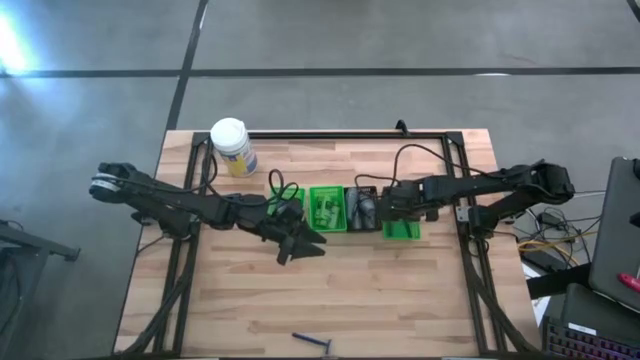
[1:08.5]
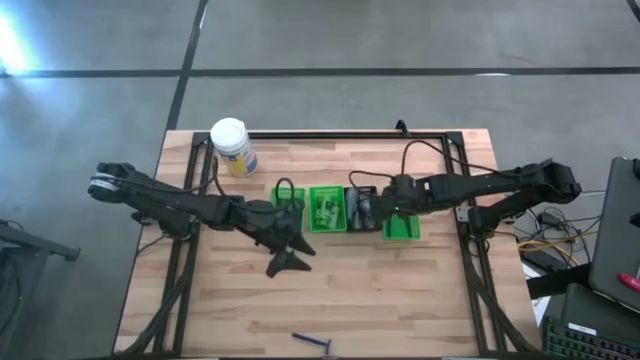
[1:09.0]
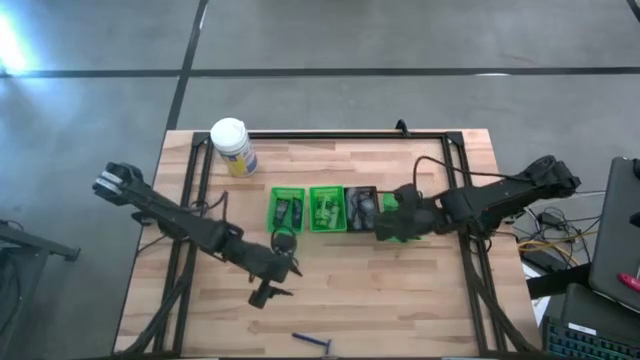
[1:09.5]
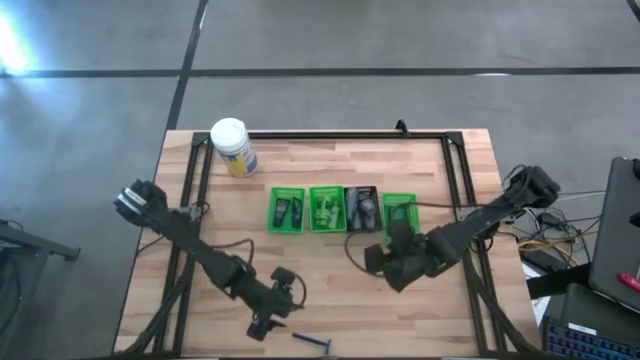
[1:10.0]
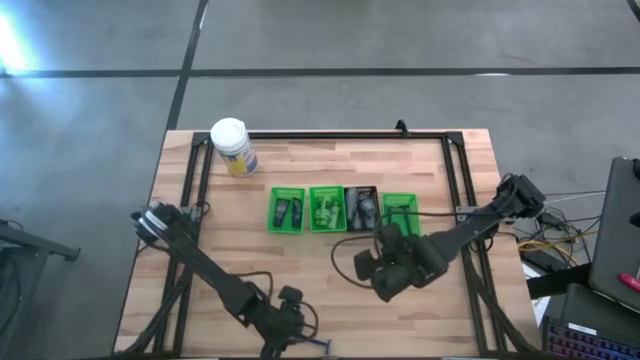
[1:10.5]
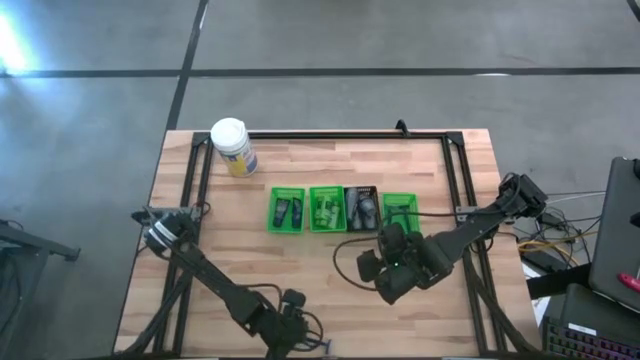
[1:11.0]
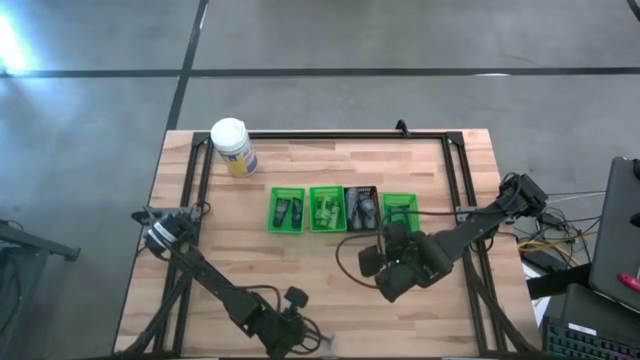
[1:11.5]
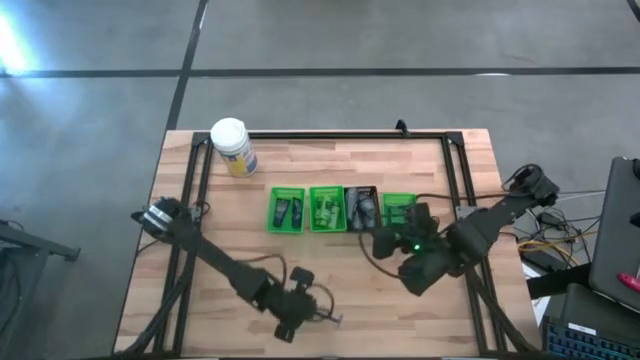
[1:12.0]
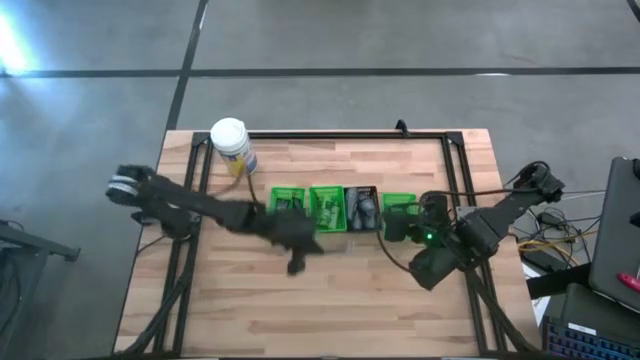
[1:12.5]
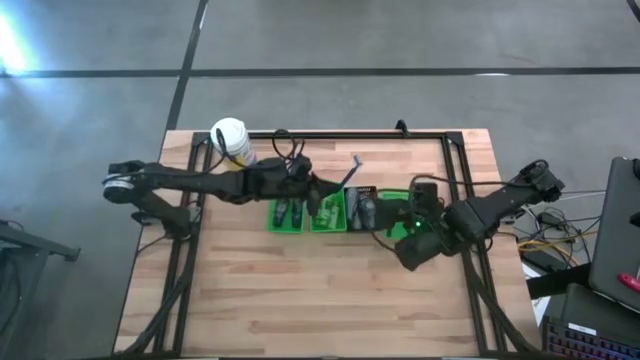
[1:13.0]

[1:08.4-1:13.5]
Task: Pick & Place Travel size toiletries
Put the blue razor into the right green bin

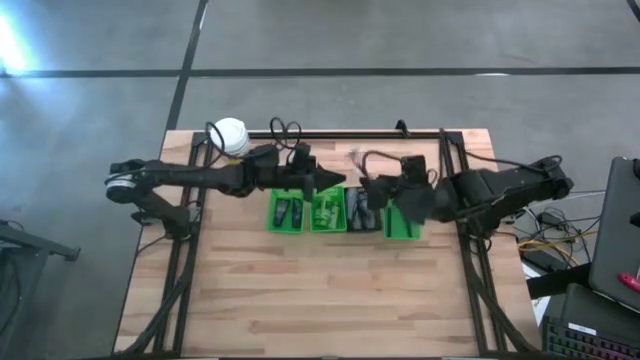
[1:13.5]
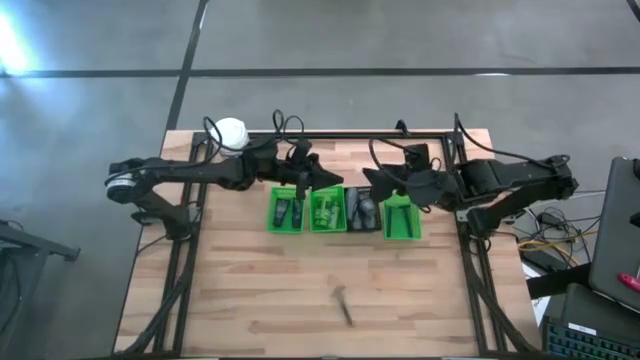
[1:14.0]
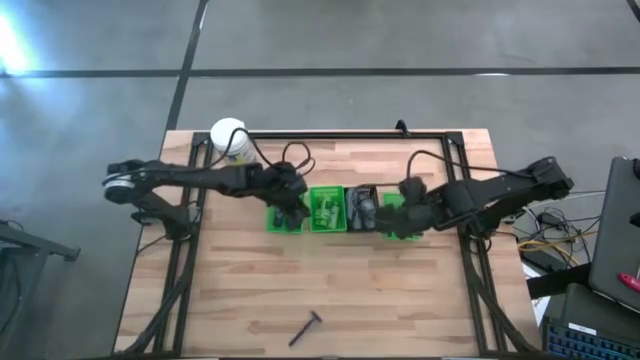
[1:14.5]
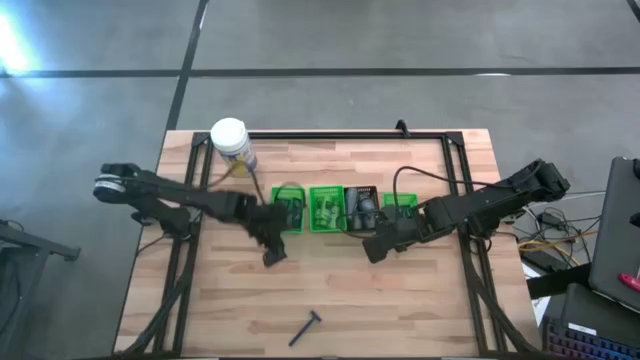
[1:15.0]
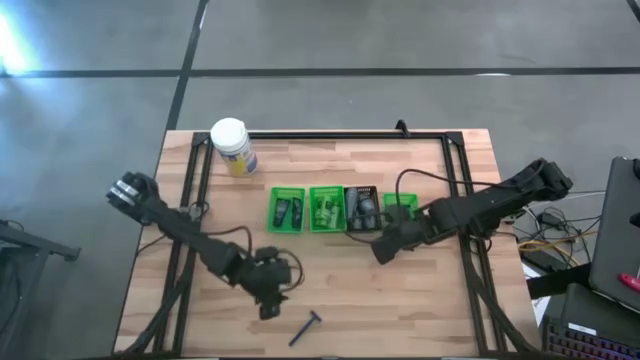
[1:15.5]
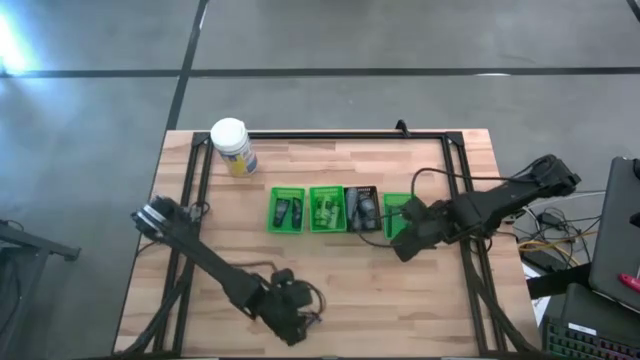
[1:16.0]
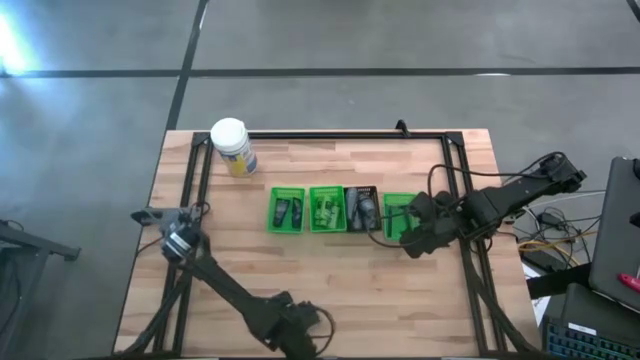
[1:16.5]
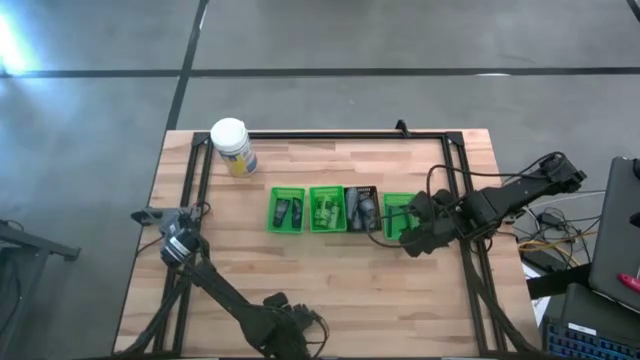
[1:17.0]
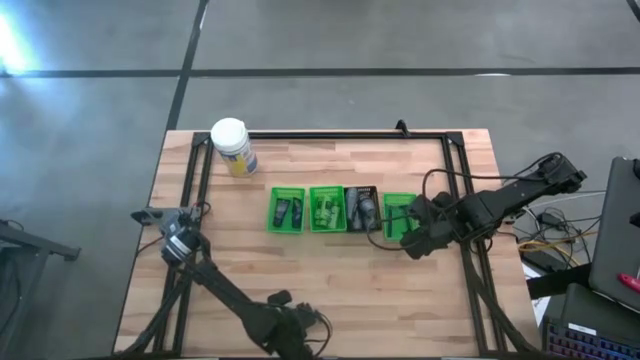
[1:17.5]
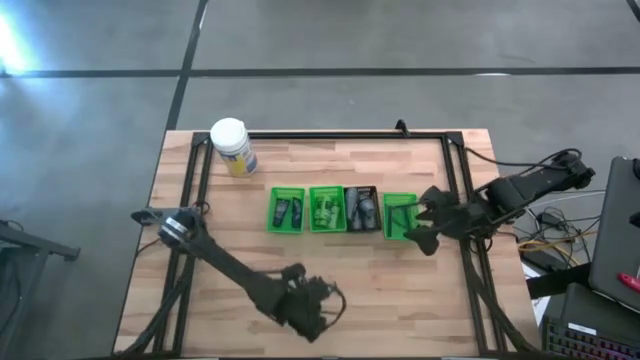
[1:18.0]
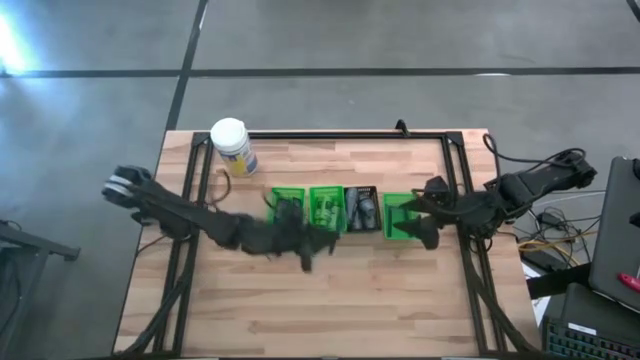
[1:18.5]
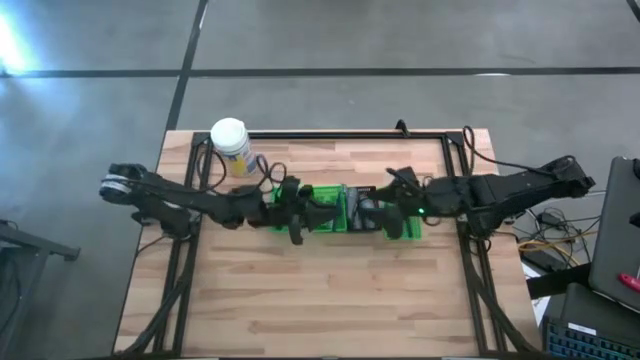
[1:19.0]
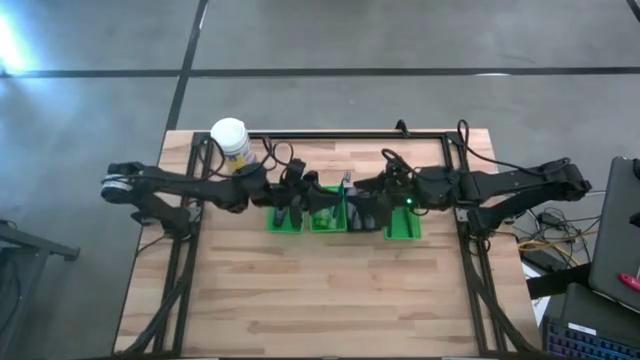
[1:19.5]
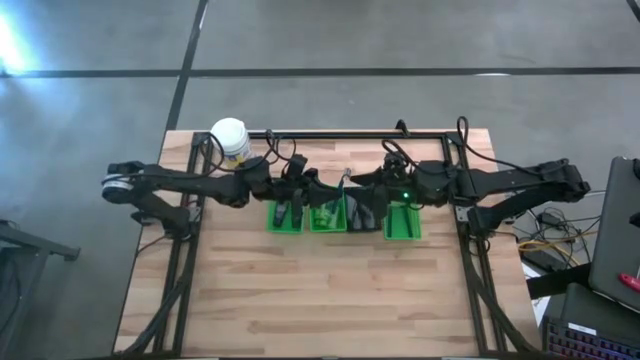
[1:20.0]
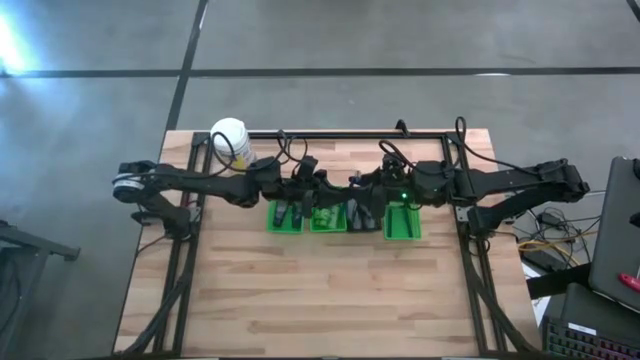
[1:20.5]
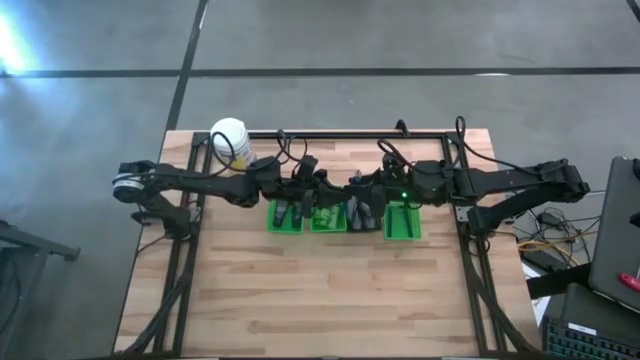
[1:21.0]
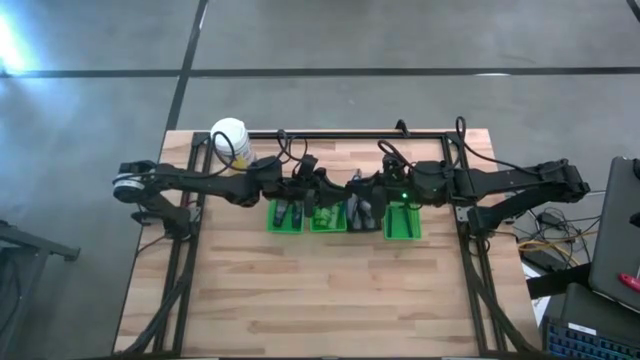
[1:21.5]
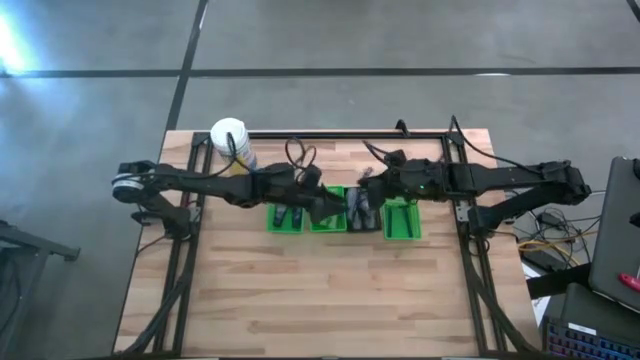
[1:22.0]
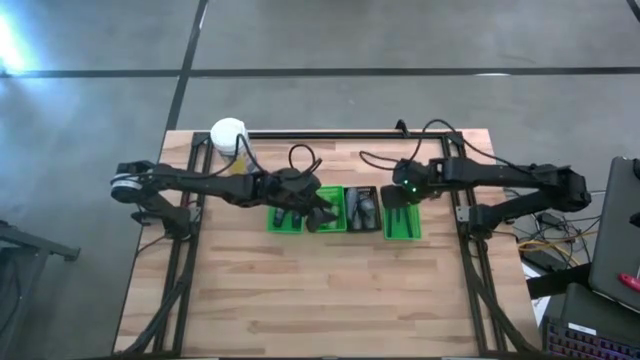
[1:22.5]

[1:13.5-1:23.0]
Put the blue razor into the right green bin

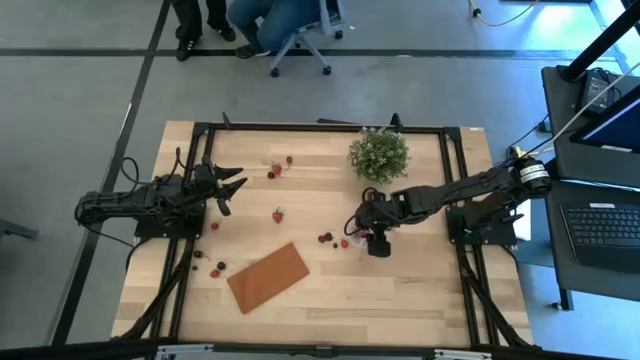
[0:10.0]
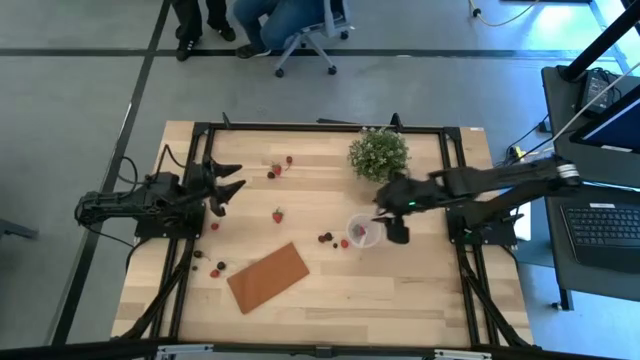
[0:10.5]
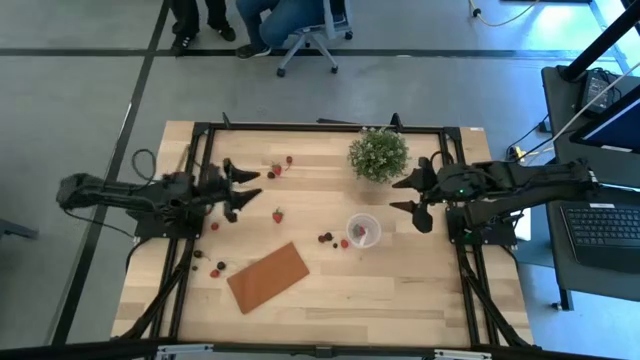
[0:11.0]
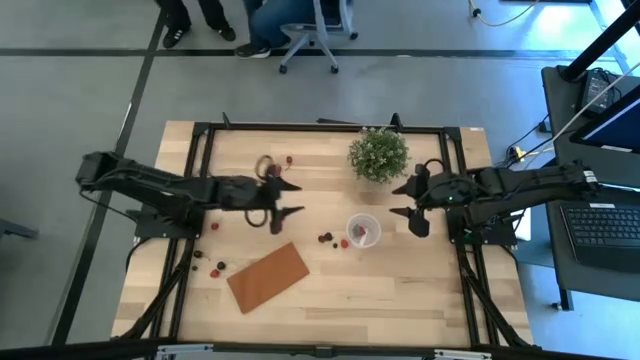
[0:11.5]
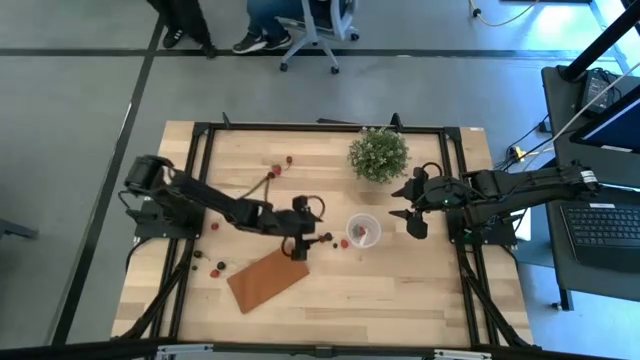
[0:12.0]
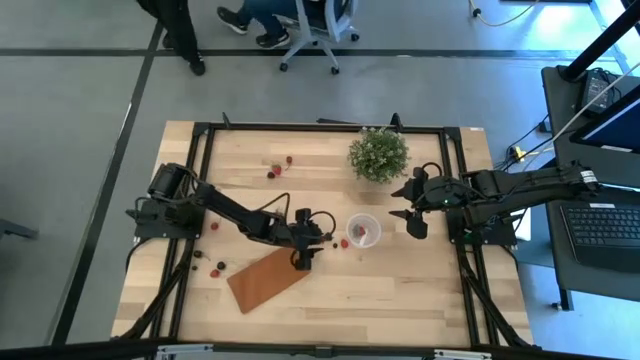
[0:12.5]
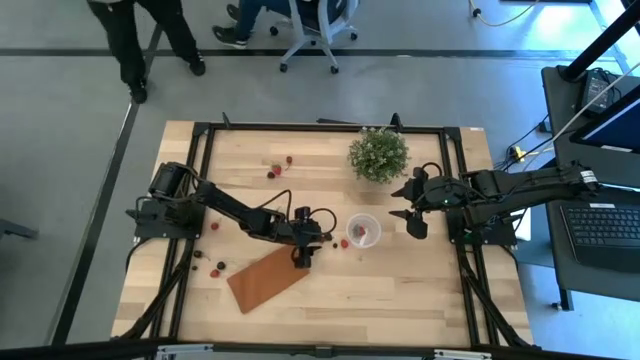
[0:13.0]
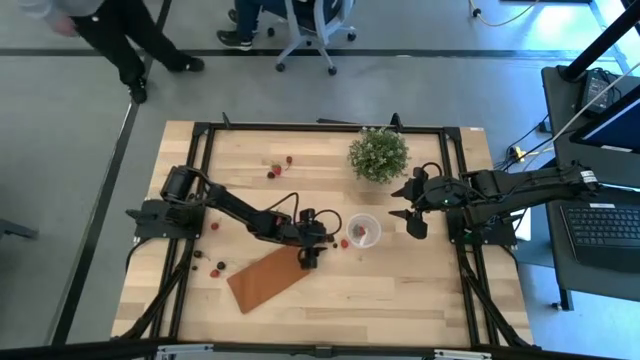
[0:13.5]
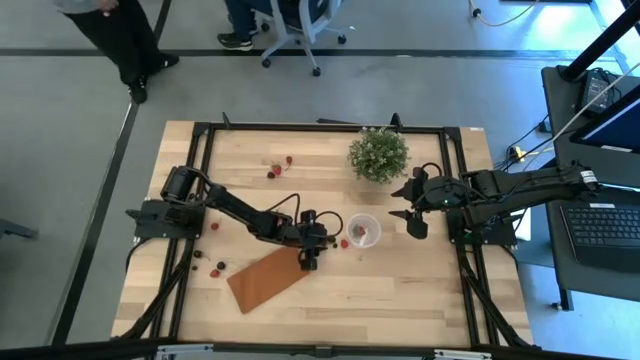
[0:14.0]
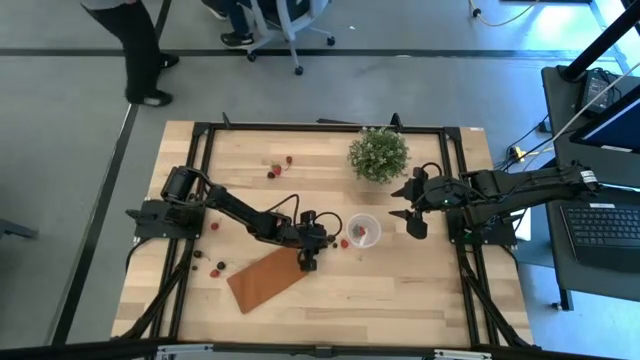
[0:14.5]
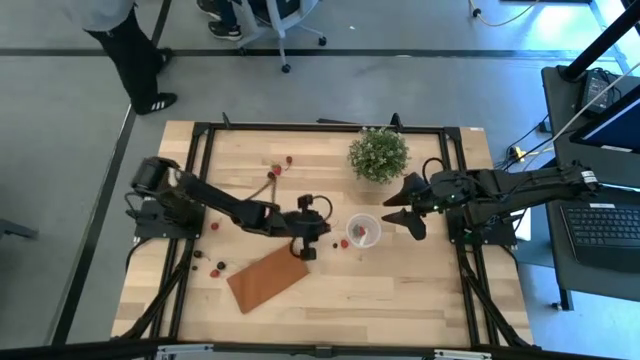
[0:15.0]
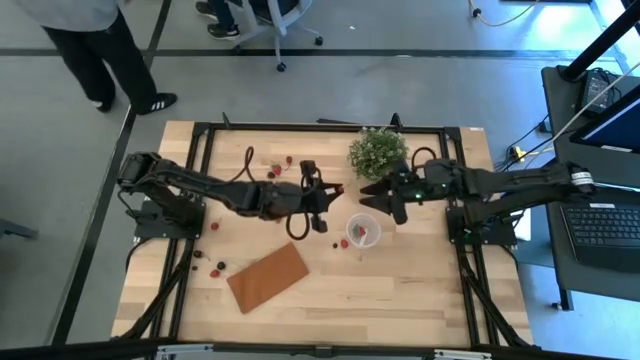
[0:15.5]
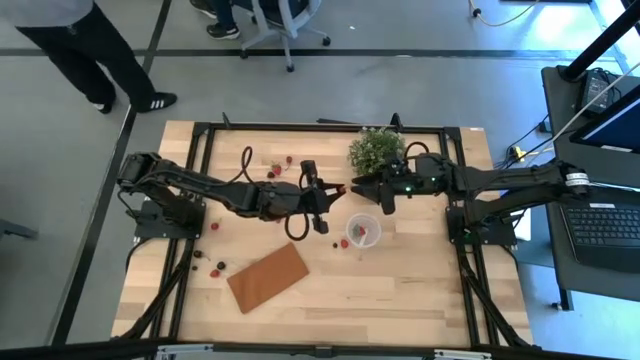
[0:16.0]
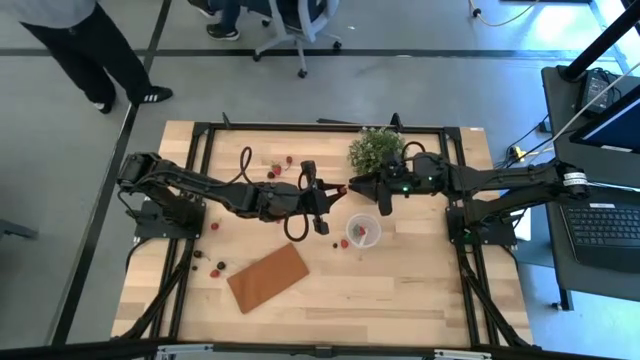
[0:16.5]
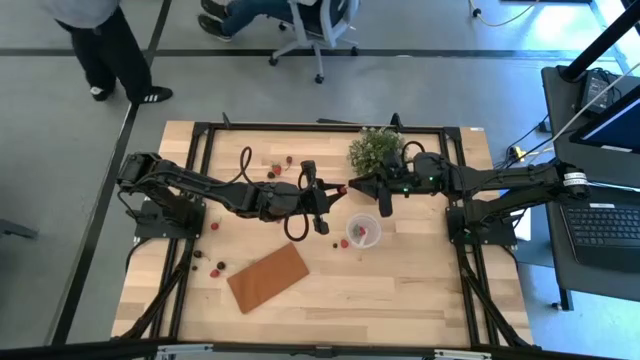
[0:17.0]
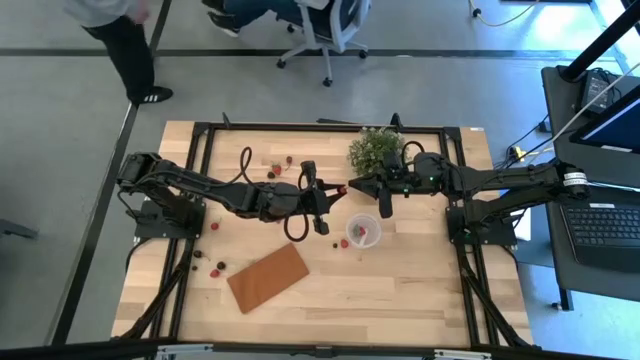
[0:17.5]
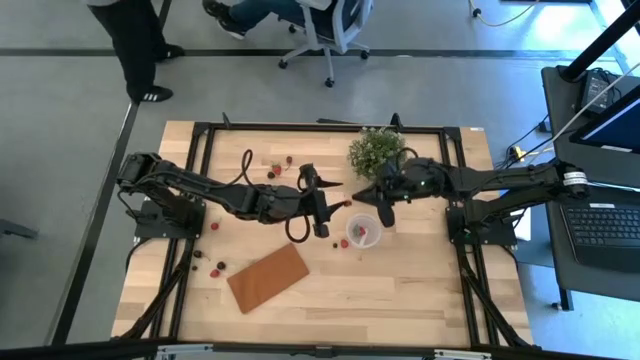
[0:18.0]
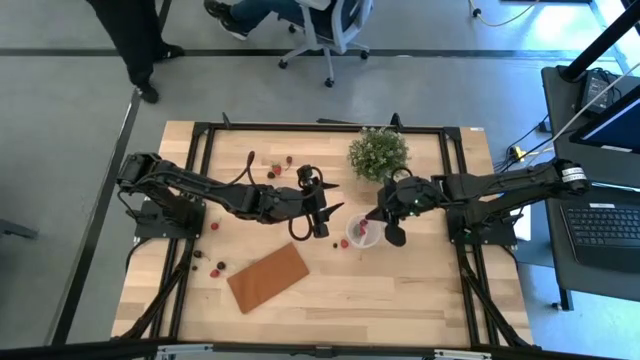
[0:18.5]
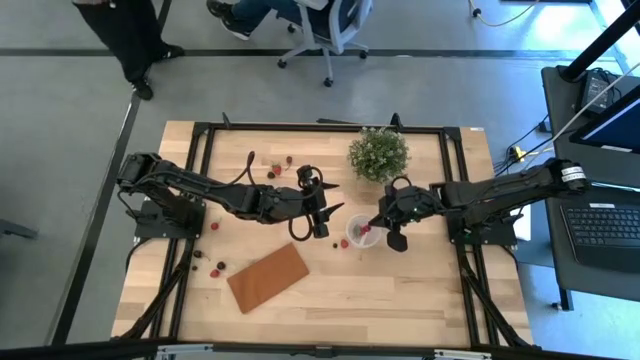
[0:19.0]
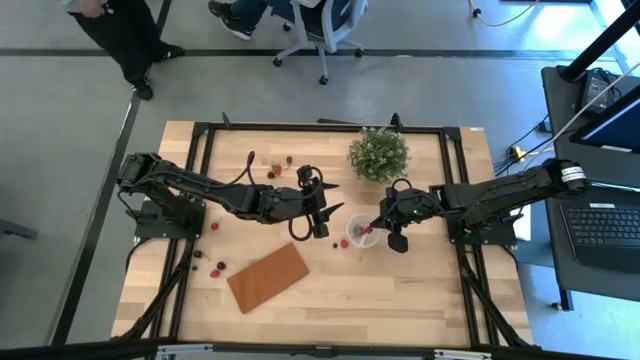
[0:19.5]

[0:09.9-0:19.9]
Task: Pick and placing Produce into tupperware
Put the red cherry into the transparent container
